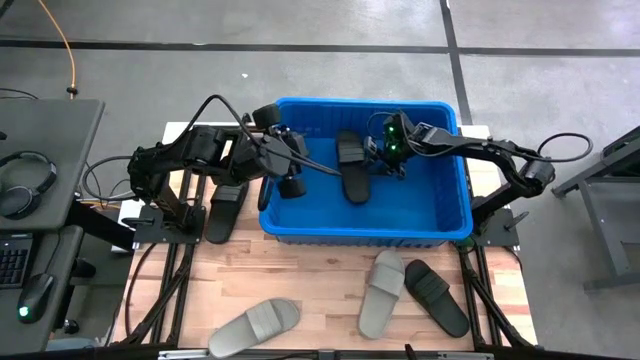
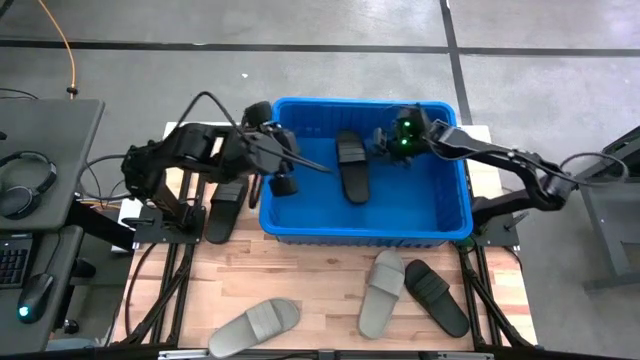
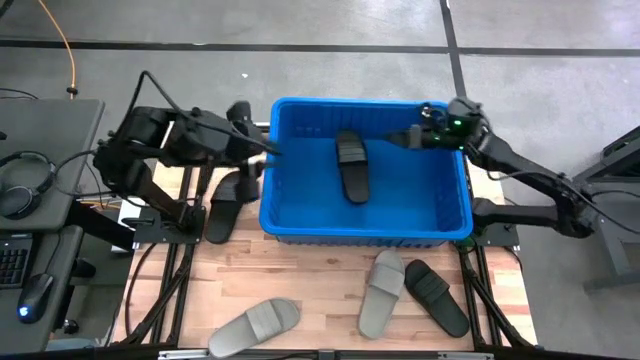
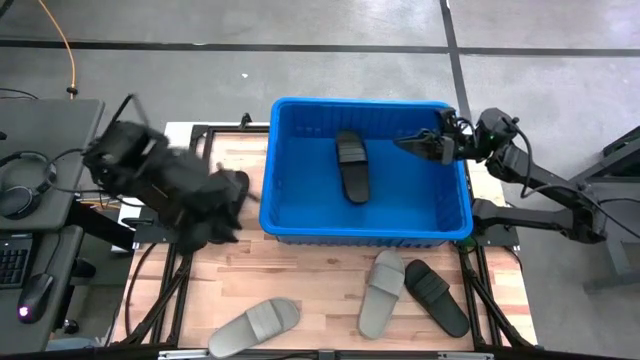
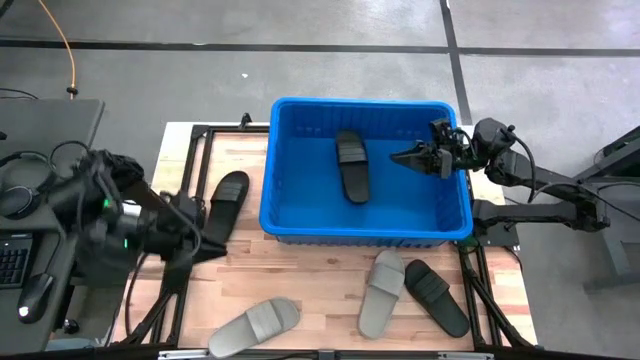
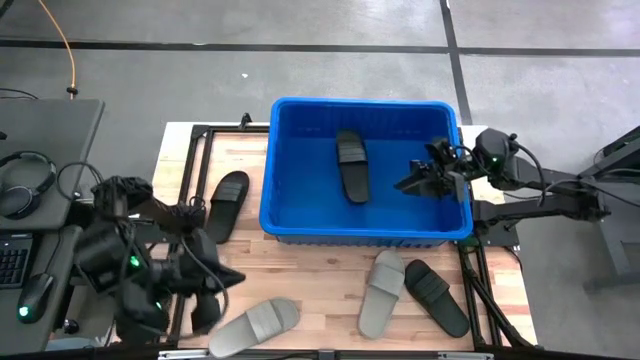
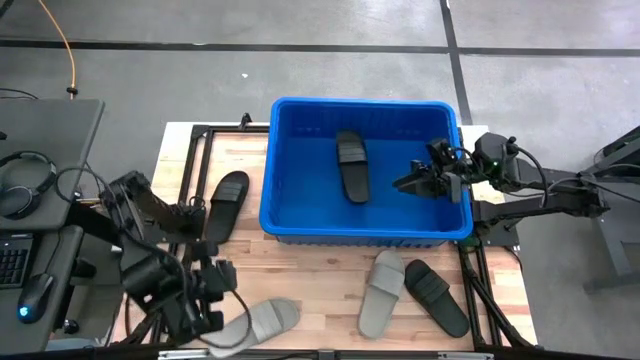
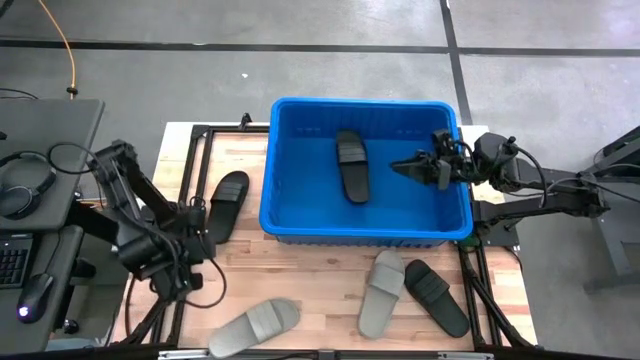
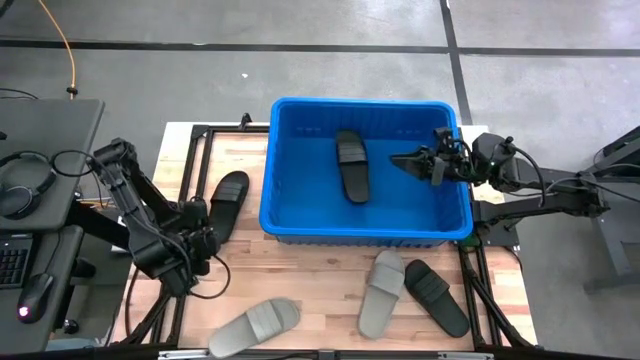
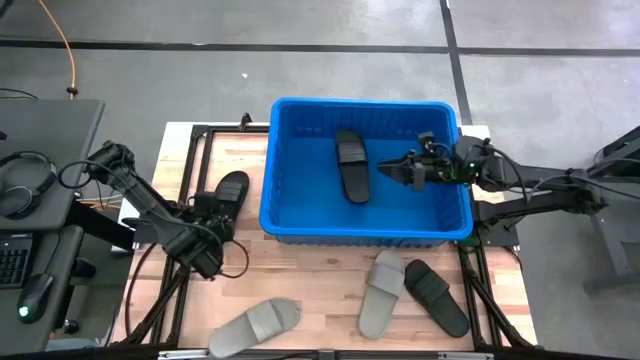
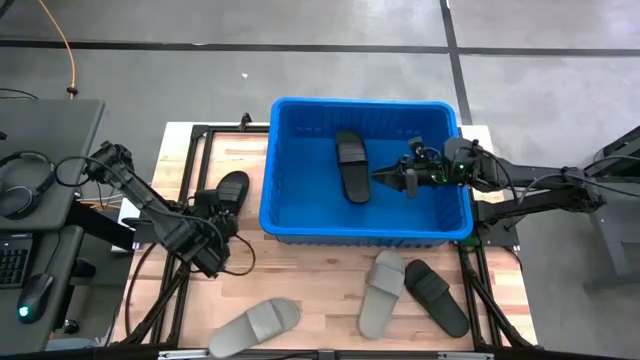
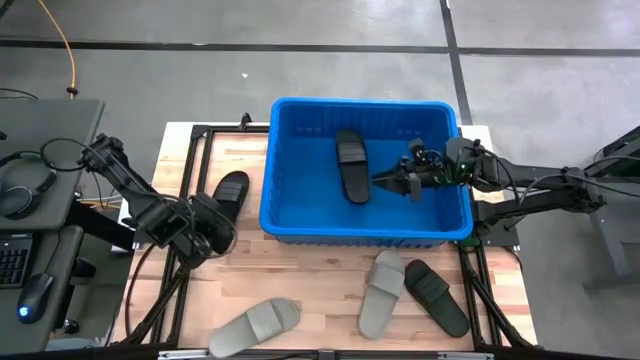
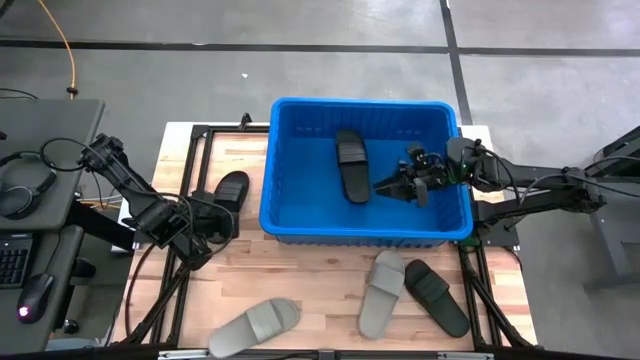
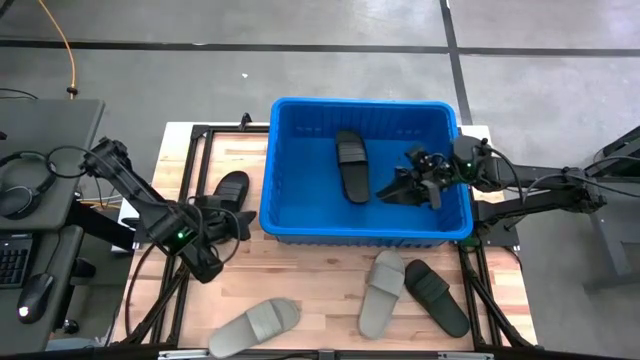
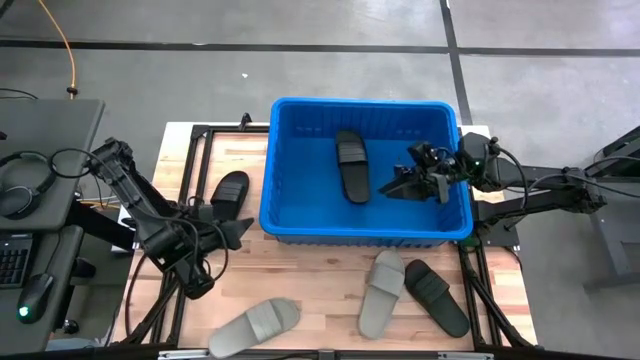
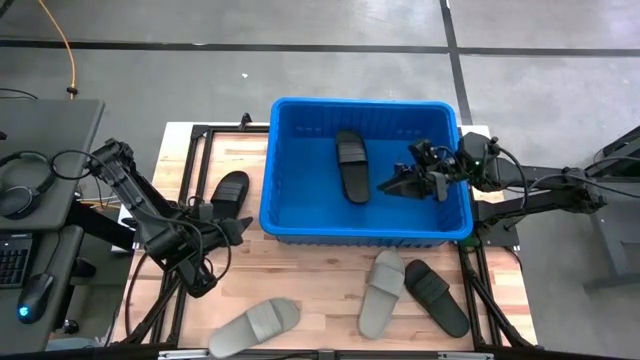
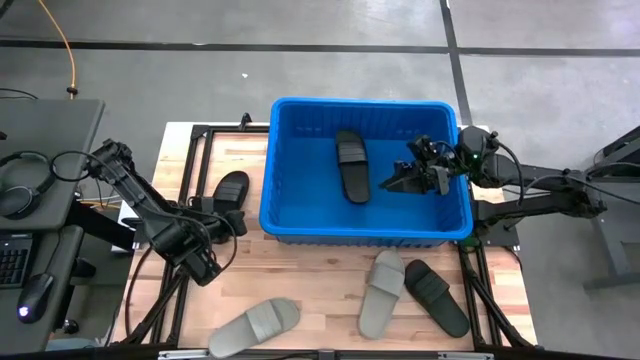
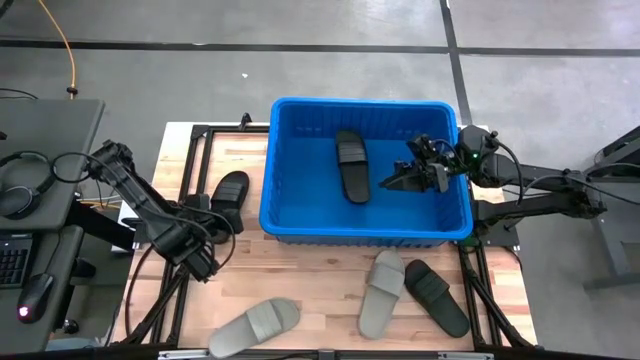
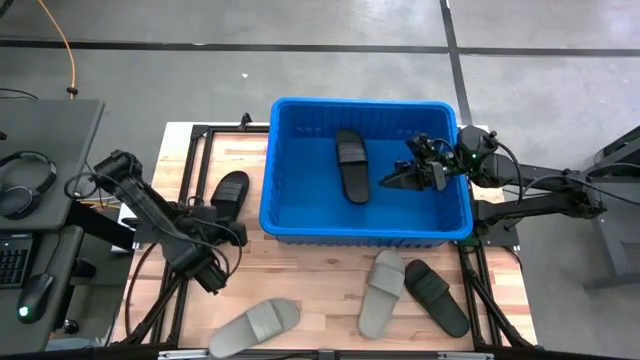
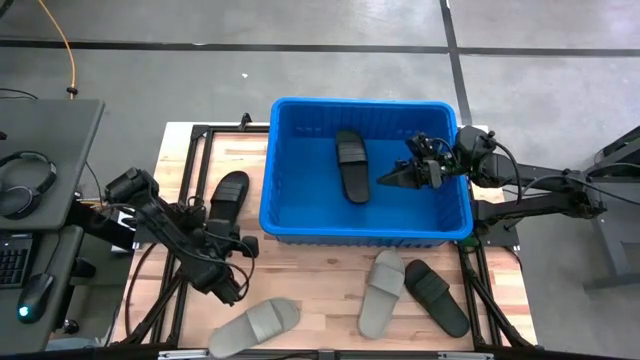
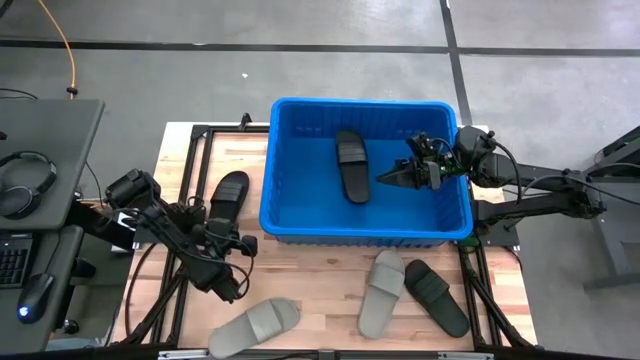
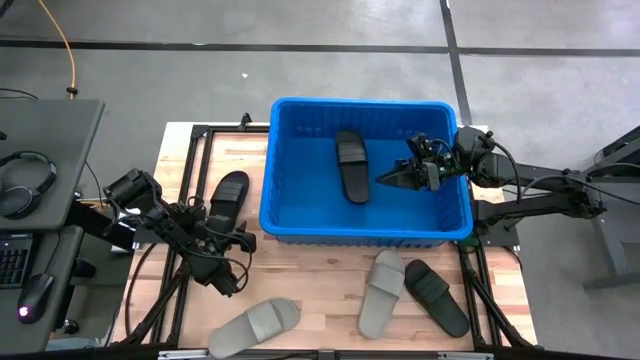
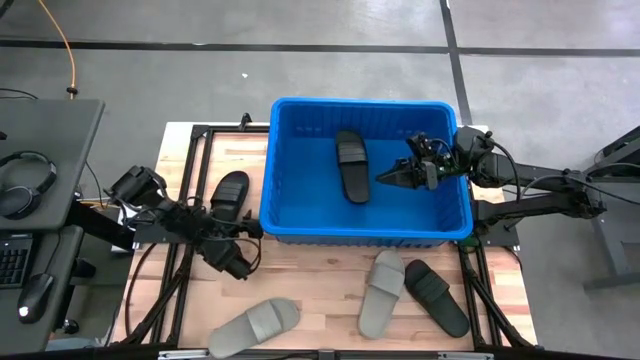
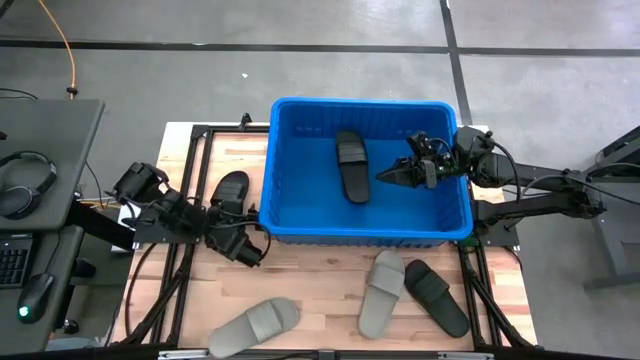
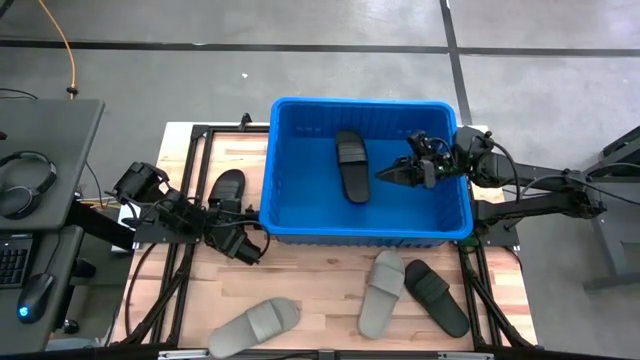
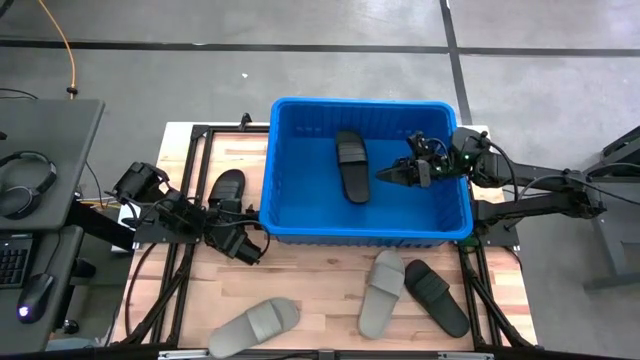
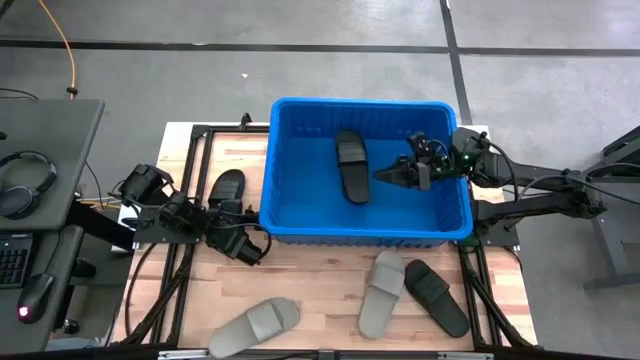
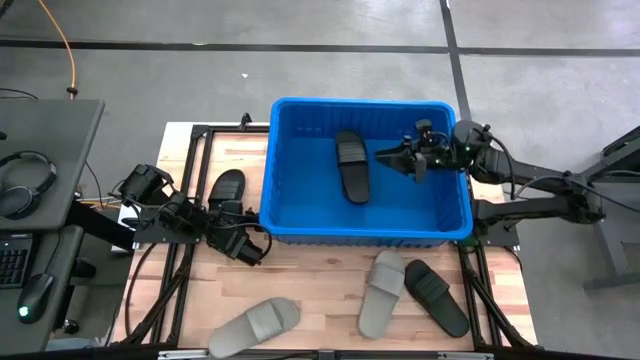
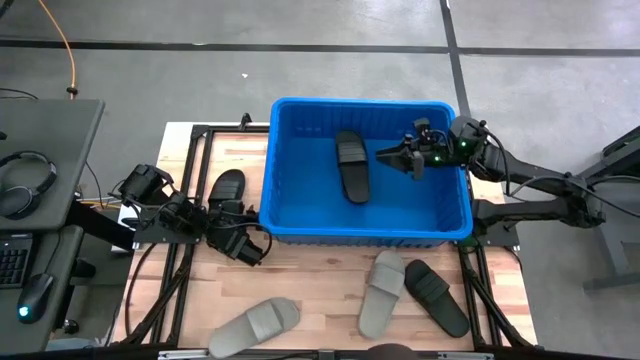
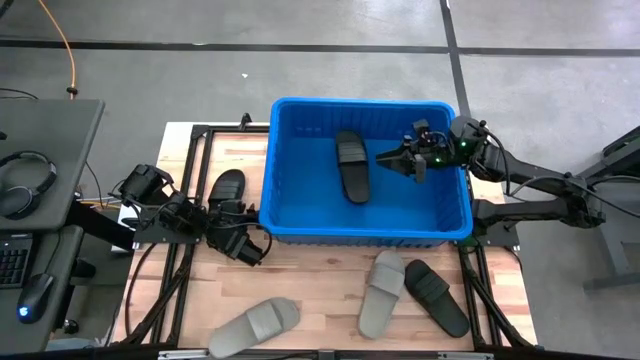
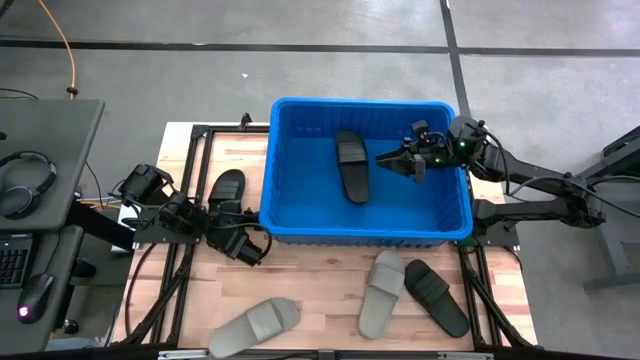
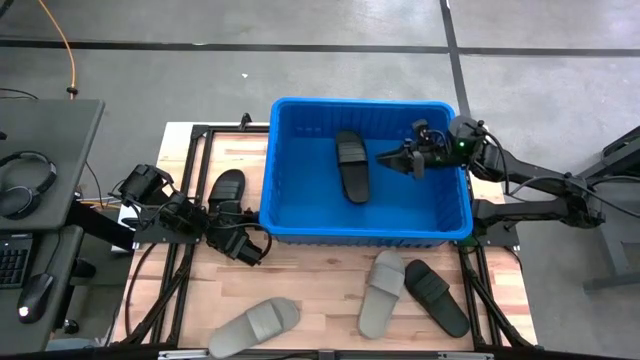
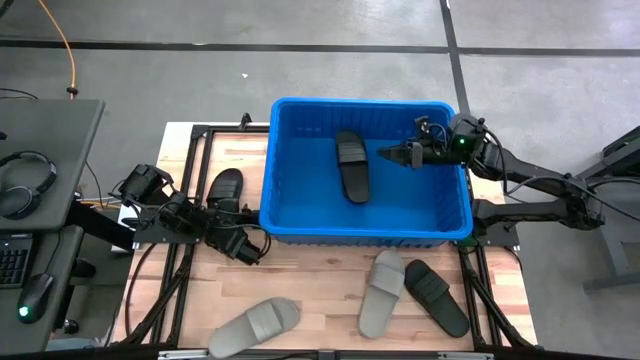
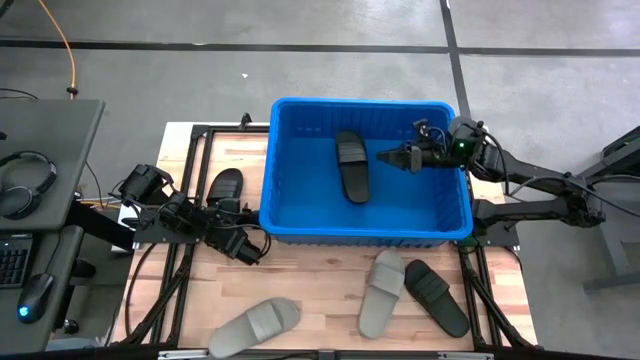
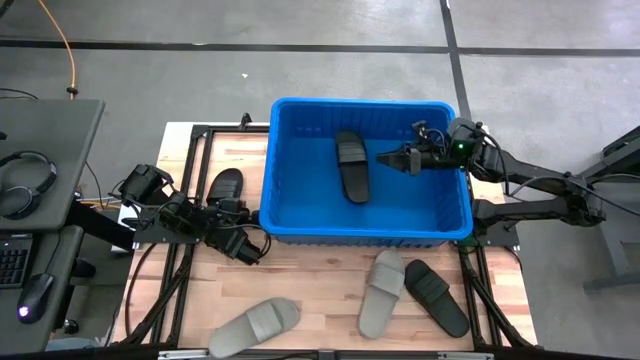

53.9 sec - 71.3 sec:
Task: Pick and place slides into bin
Put the black slides into the blue bin

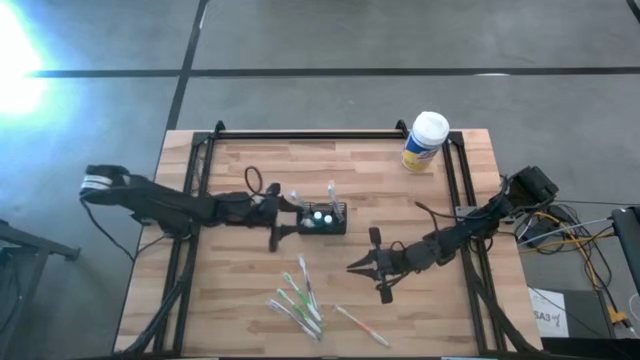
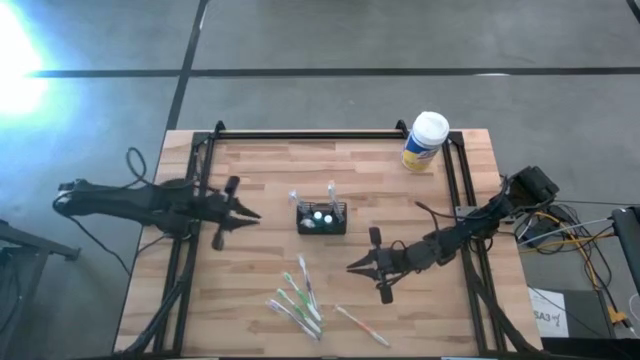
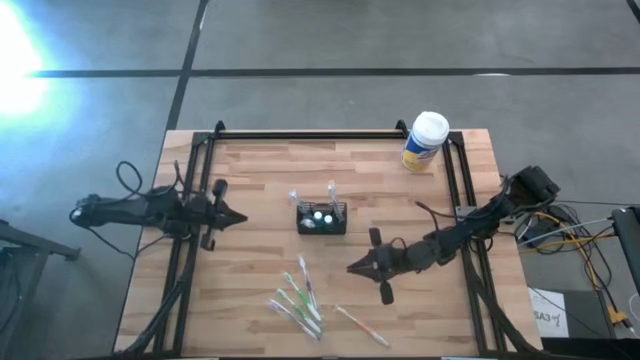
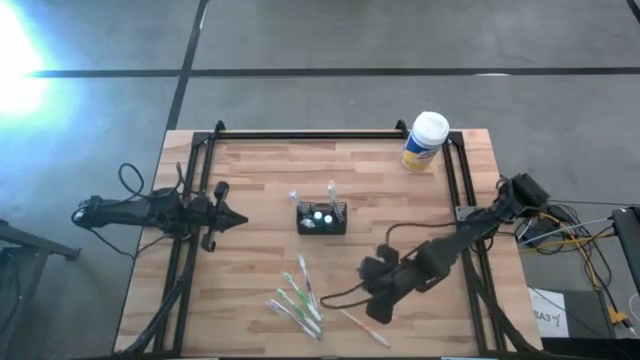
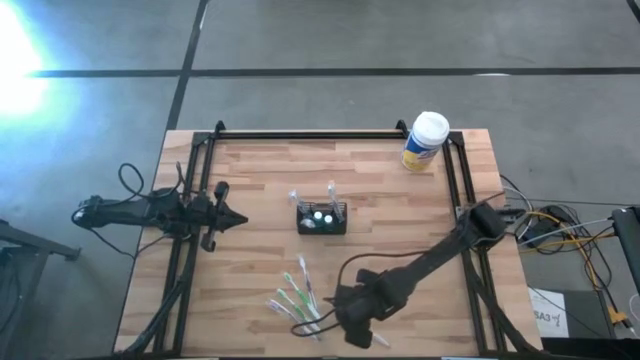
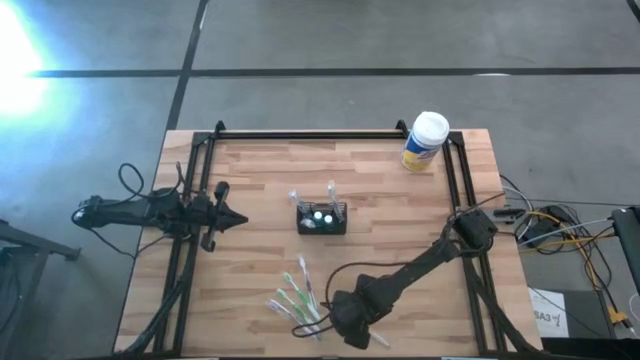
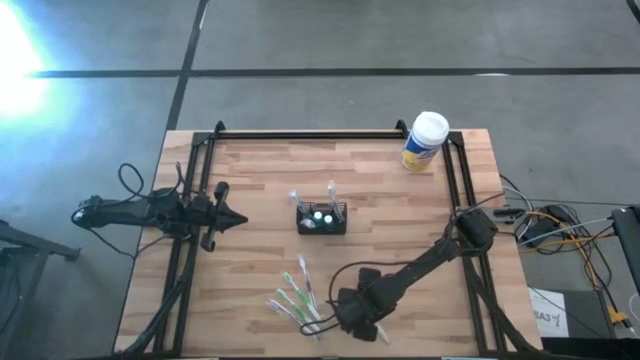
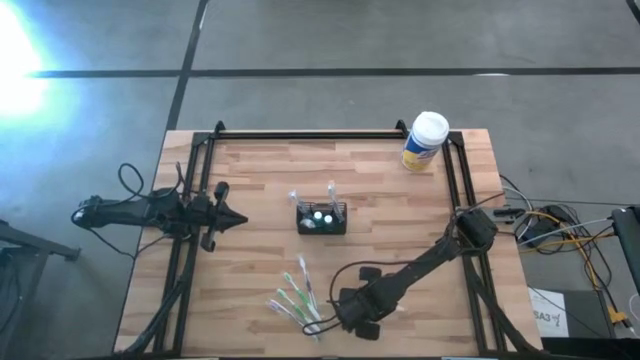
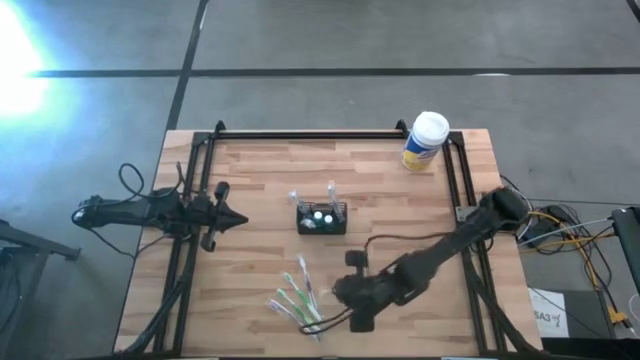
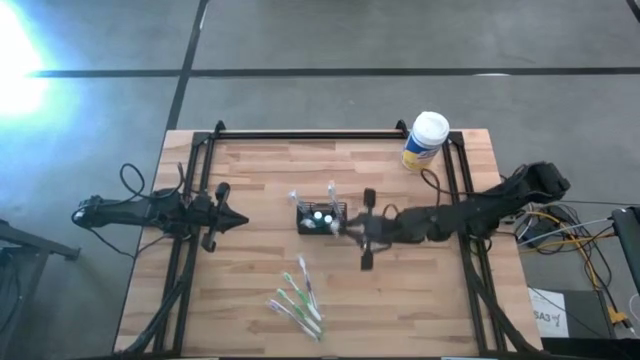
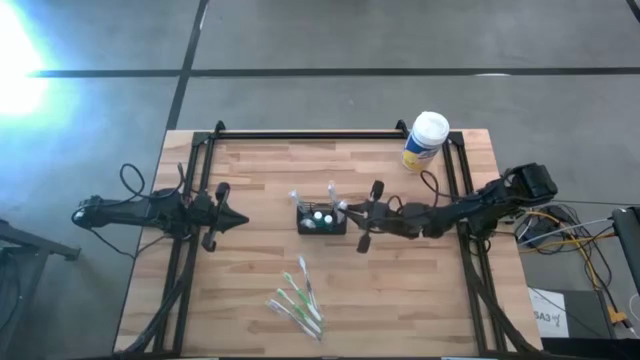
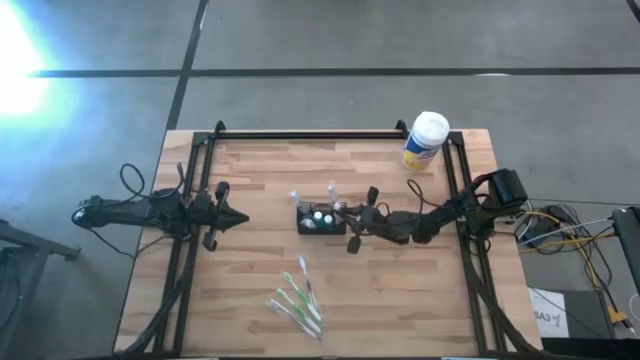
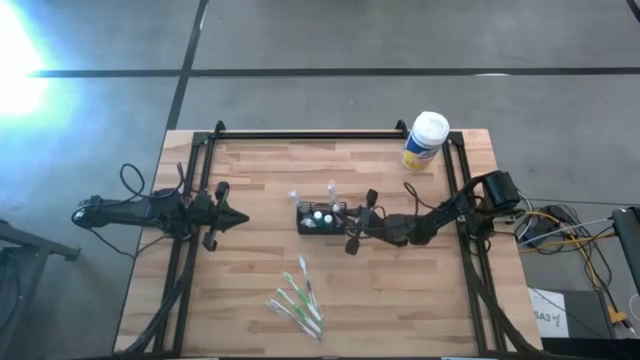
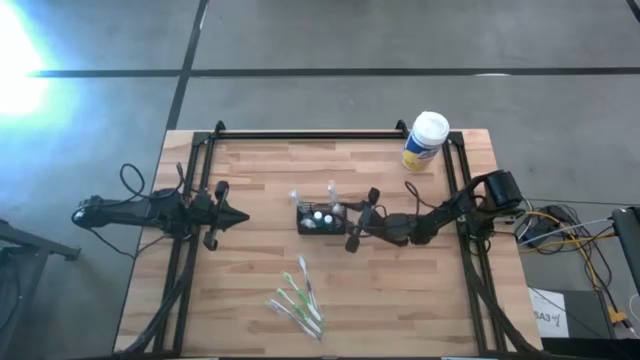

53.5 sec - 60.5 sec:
Task: Pick & Place toothbrushing station
Put the orange toothbrush into the black mesh organizer
